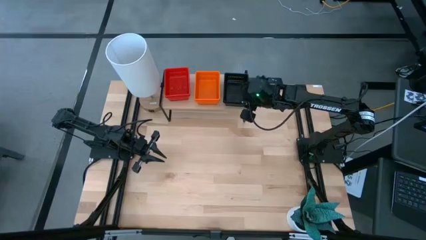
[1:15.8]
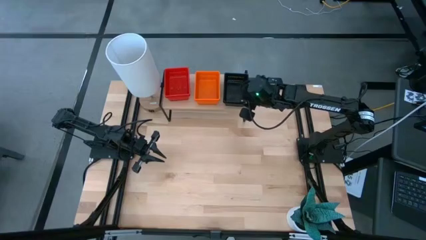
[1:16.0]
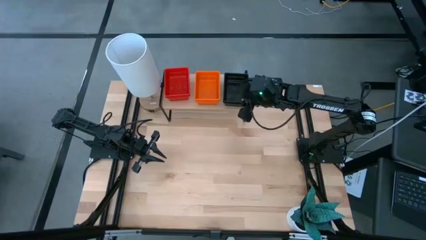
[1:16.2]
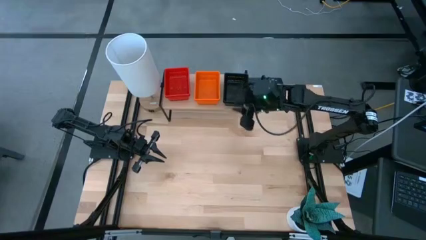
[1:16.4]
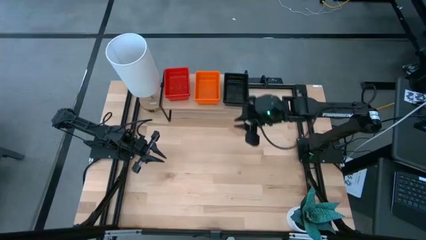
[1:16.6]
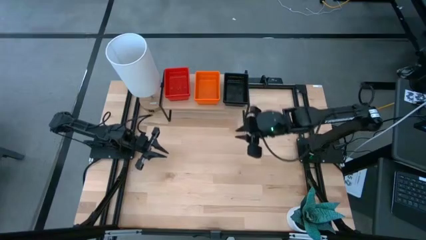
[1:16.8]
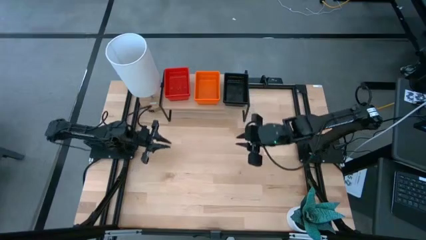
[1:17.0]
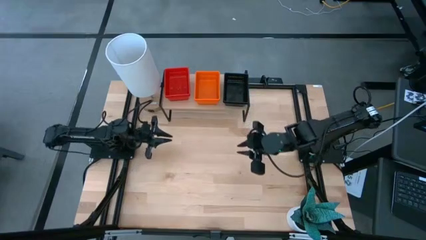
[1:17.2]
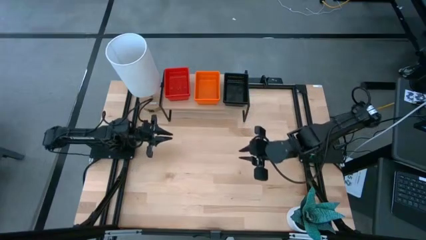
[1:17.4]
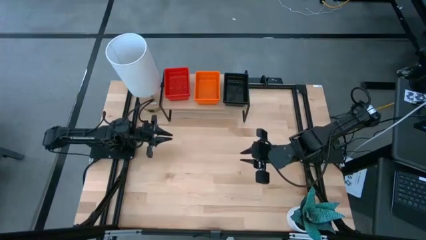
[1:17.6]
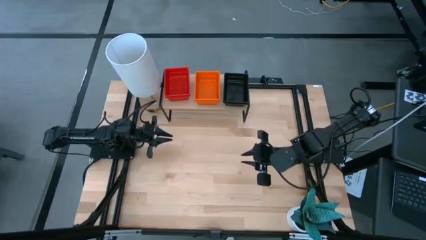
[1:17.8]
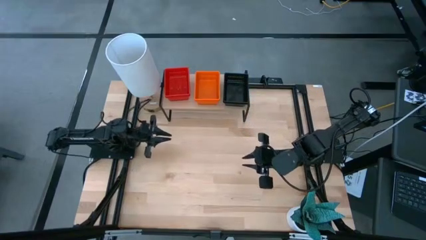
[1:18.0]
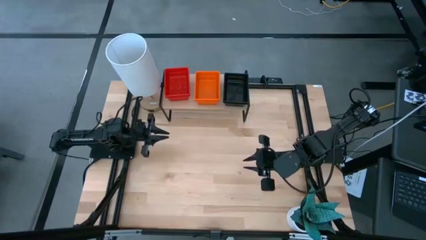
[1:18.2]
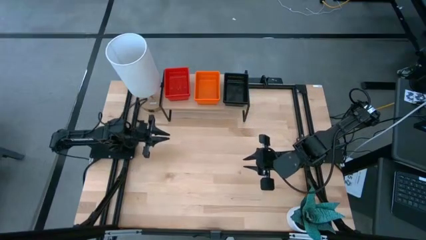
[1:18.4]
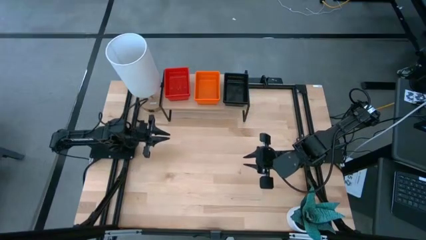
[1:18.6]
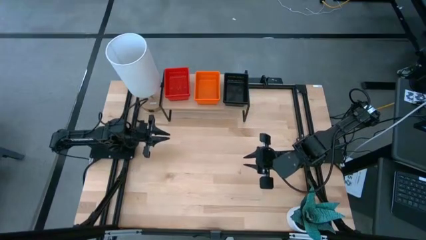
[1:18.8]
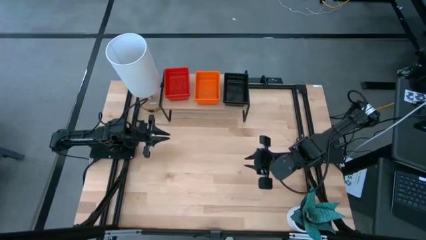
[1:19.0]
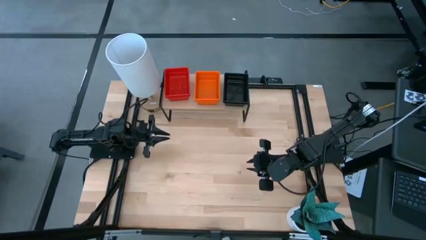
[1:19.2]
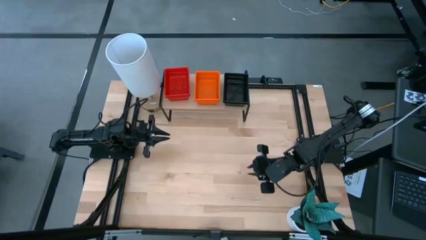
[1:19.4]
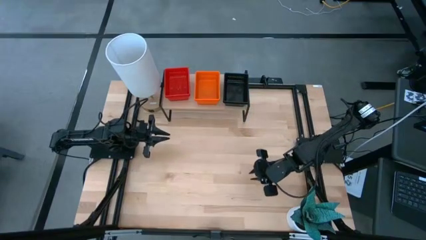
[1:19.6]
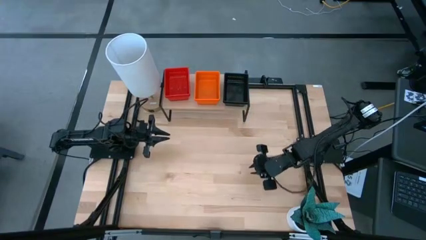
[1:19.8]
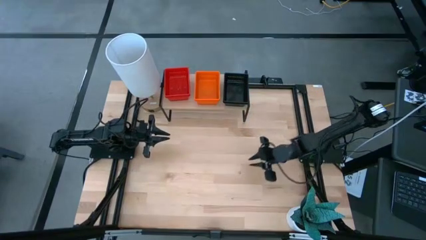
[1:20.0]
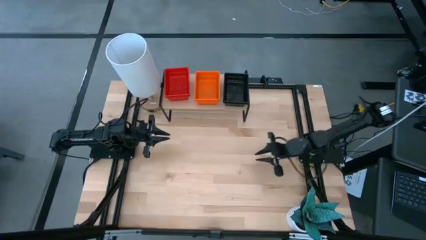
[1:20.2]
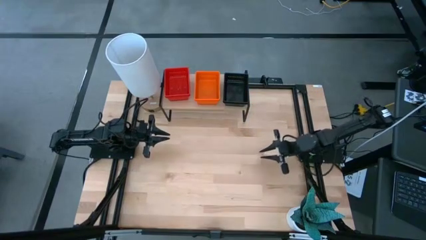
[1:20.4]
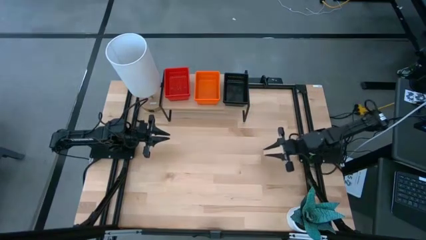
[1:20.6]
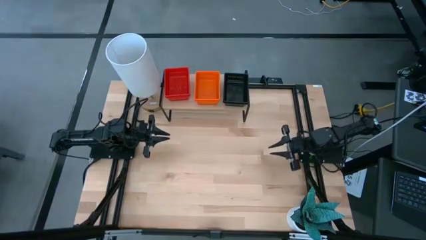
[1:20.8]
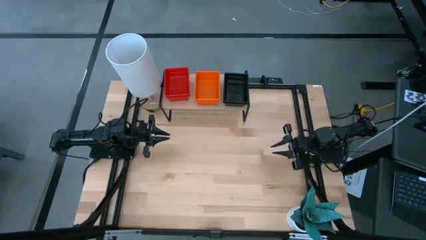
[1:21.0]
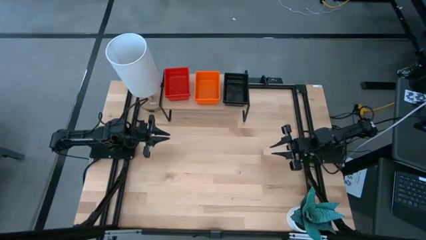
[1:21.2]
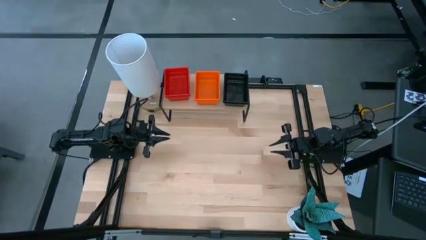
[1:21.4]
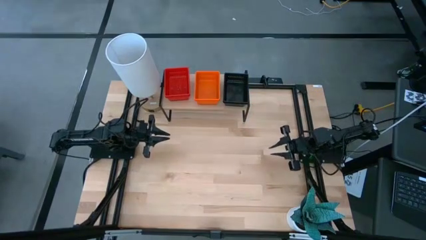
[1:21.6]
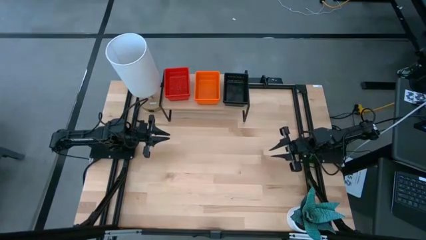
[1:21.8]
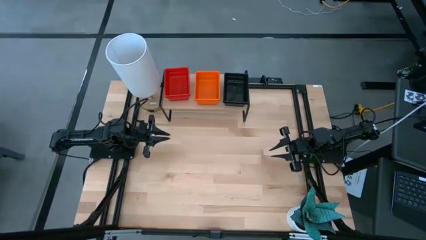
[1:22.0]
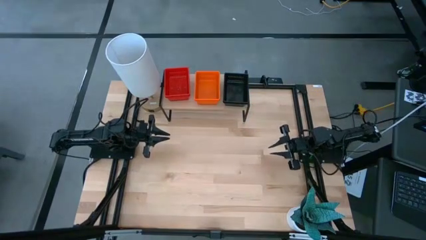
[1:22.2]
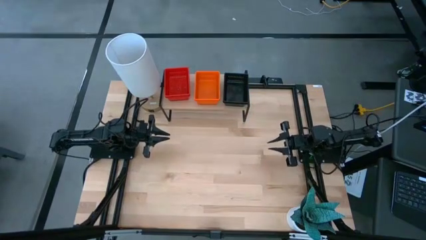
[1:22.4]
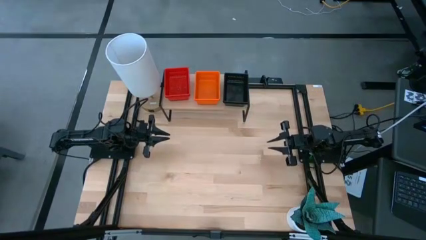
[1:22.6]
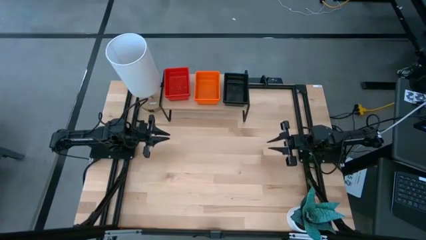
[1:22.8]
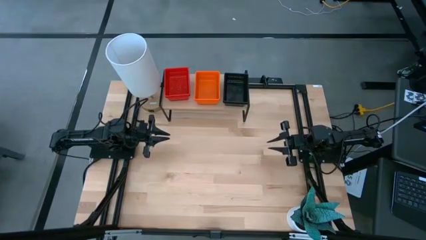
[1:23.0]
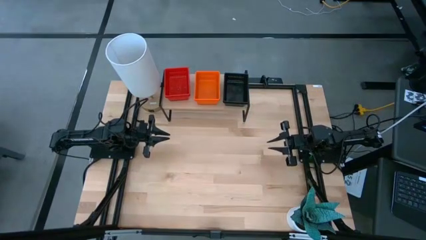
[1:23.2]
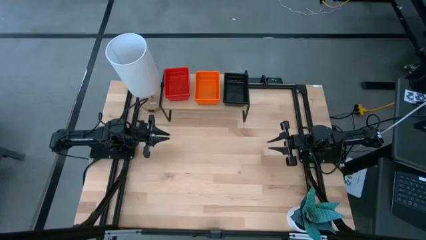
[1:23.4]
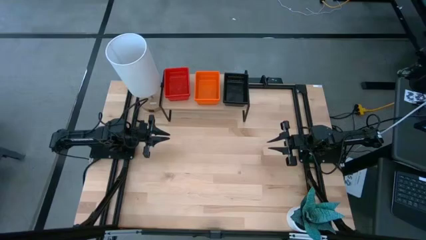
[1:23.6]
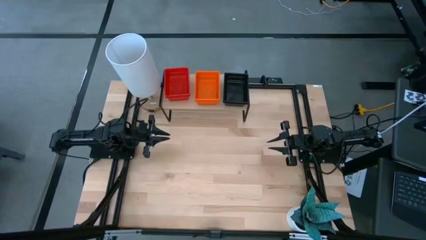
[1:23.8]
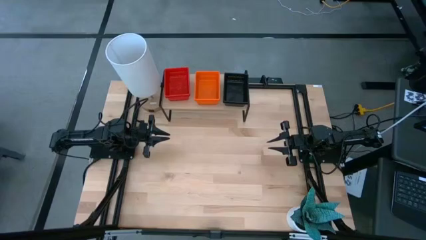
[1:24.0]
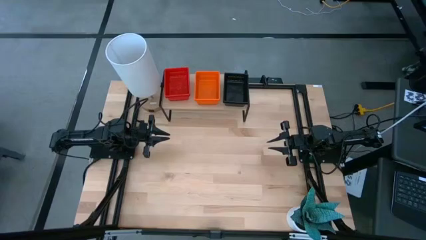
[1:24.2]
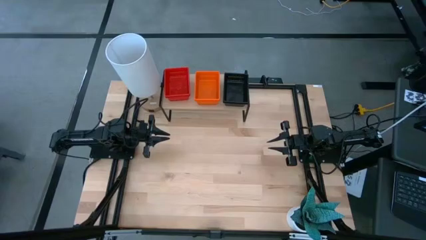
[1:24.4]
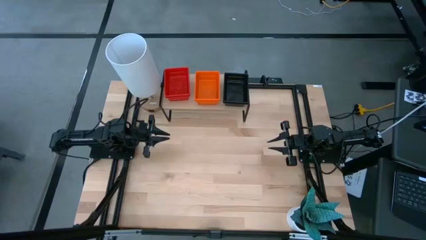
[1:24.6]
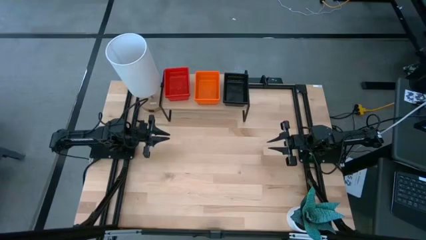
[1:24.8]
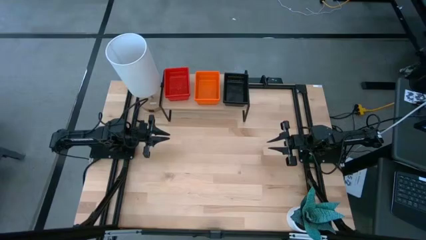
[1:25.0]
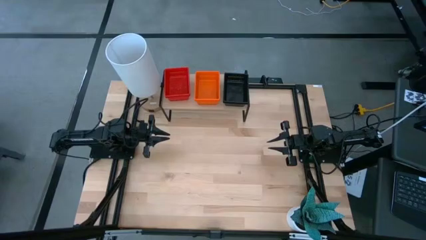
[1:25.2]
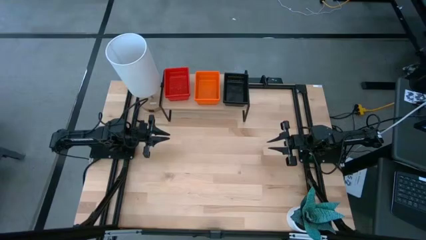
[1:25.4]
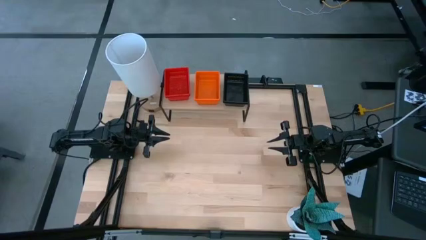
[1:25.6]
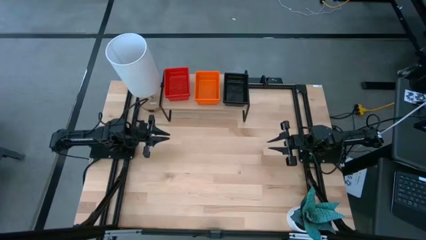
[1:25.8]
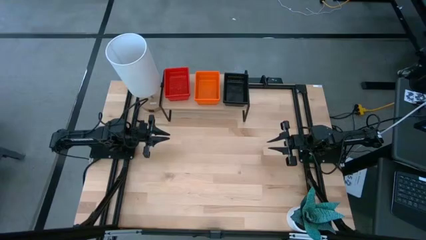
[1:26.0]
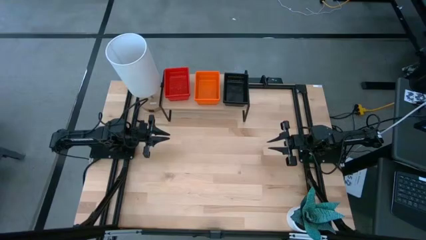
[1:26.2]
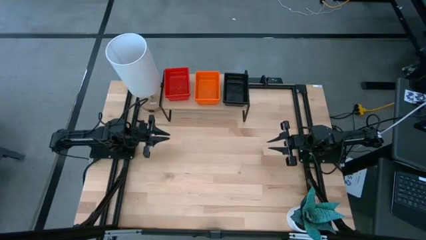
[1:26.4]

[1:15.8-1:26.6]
Task: Stack baskets on shelf by color
Return to Home Position
